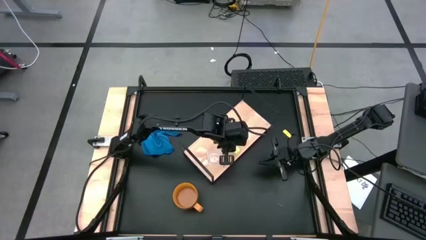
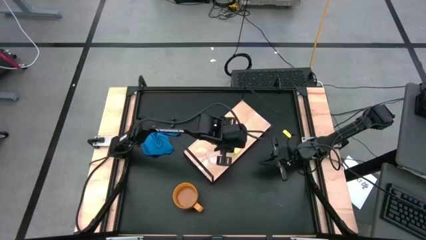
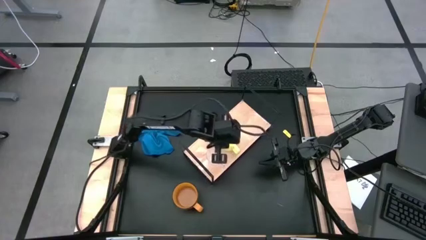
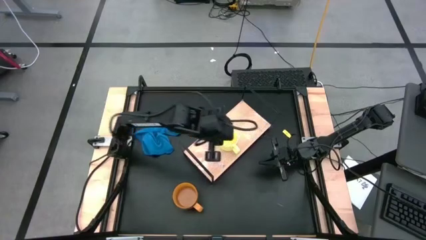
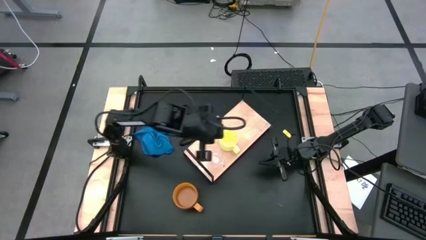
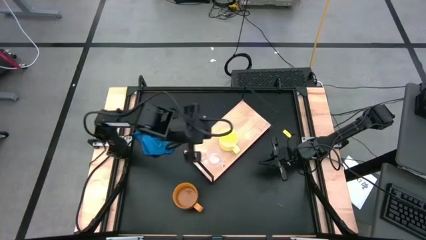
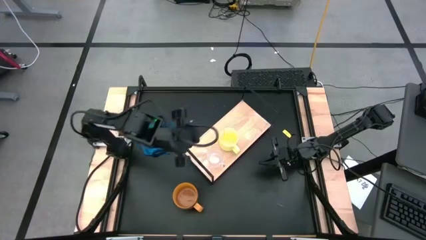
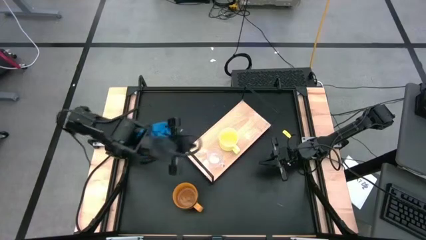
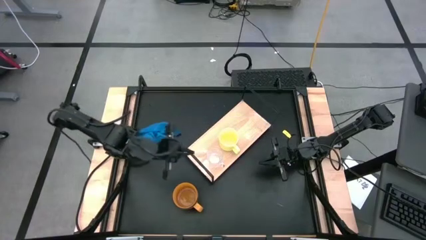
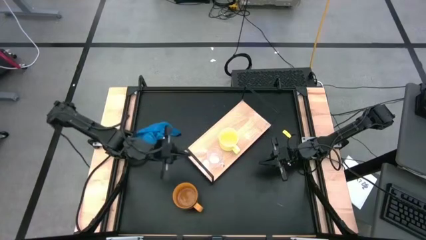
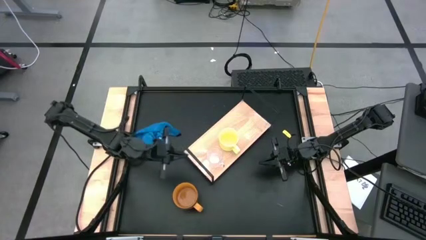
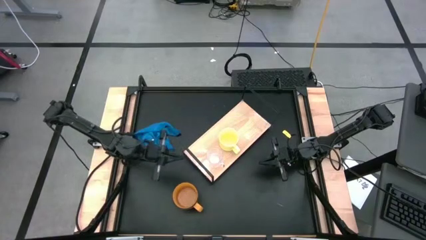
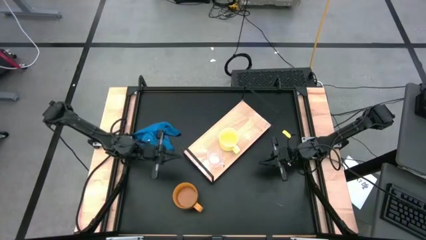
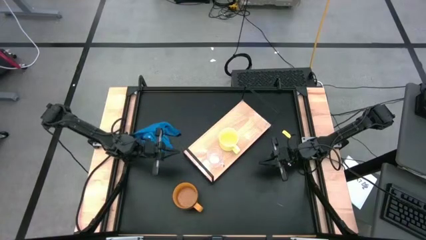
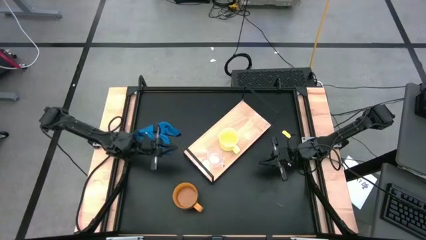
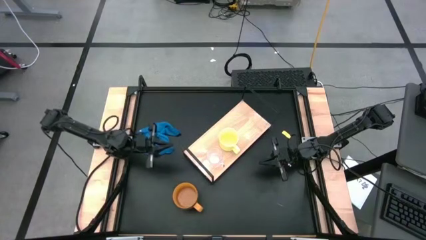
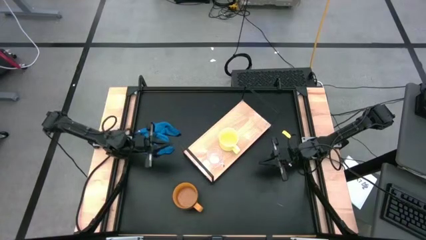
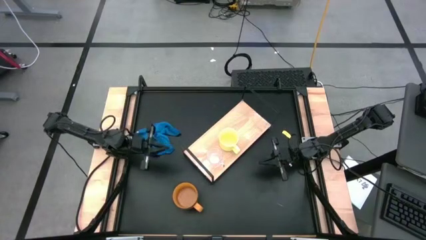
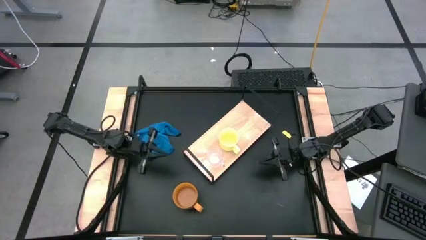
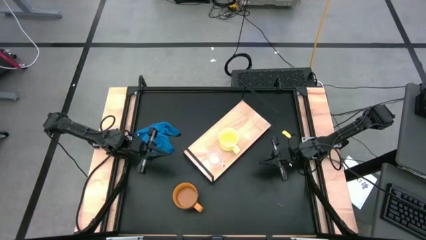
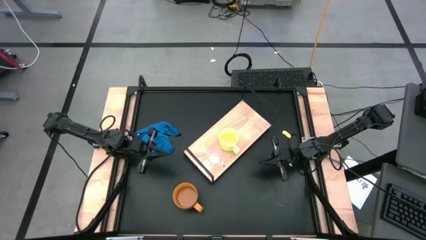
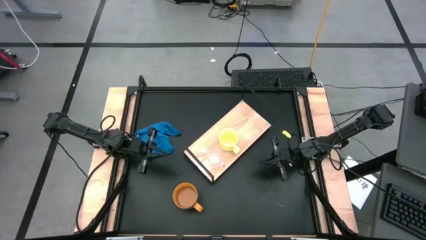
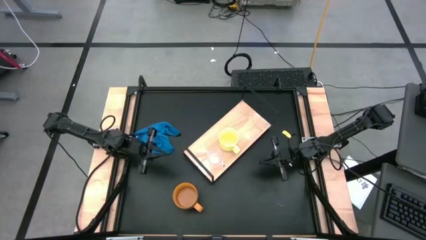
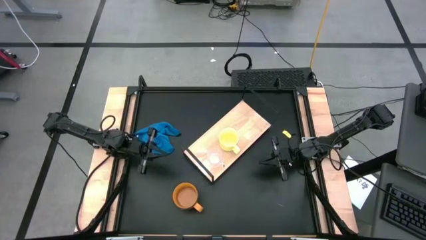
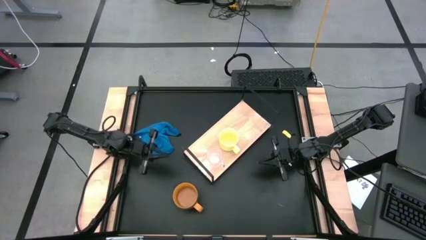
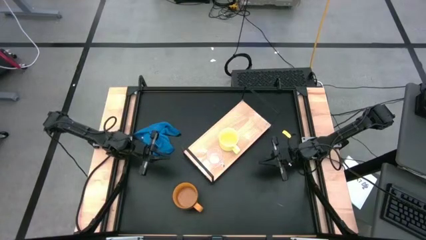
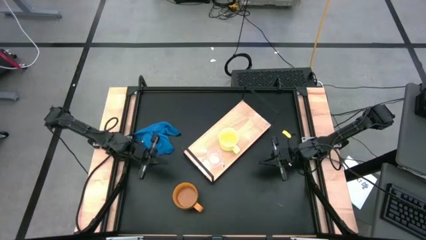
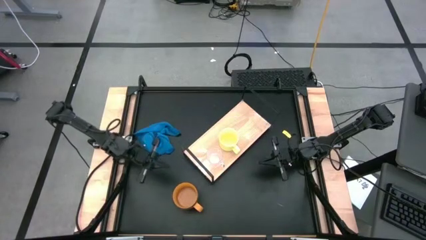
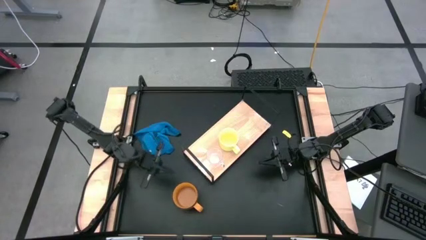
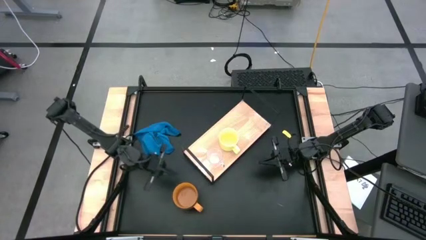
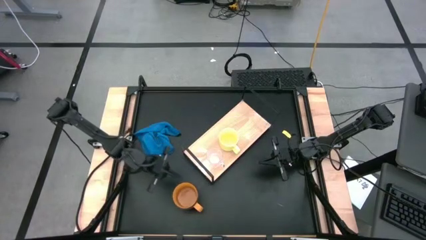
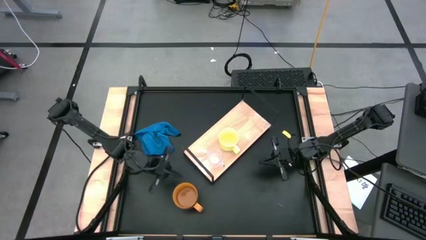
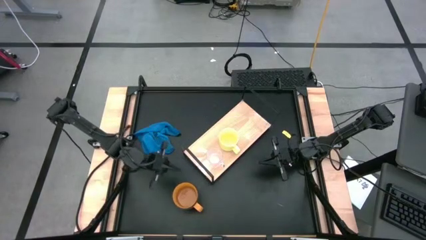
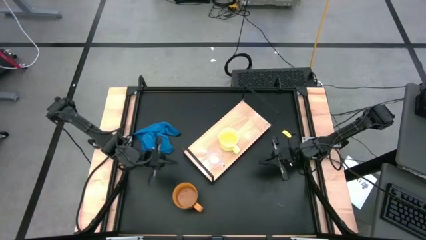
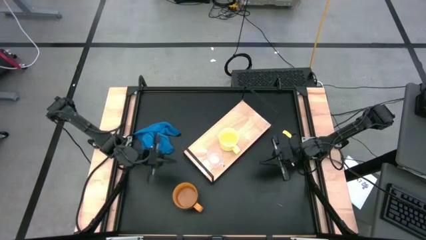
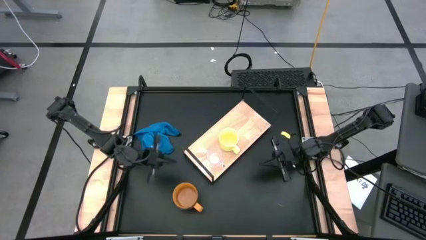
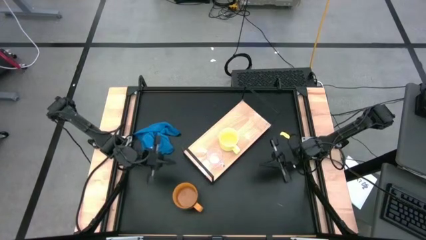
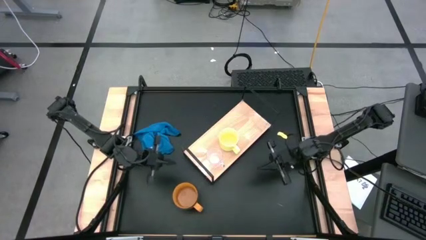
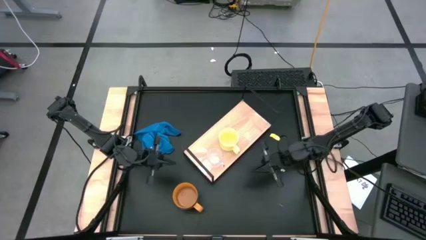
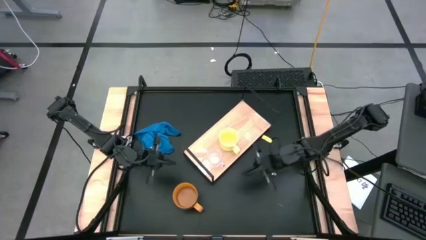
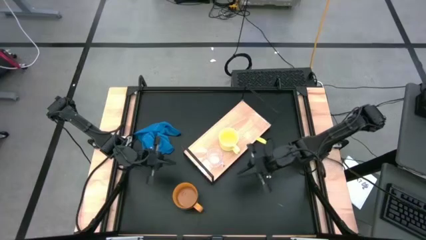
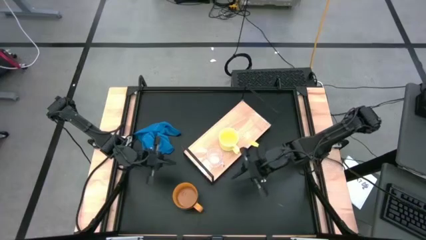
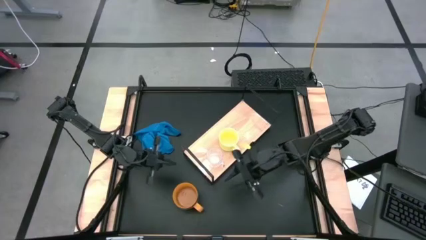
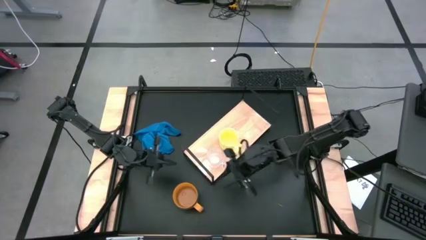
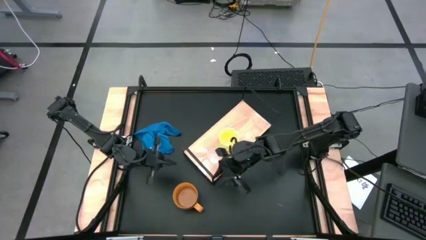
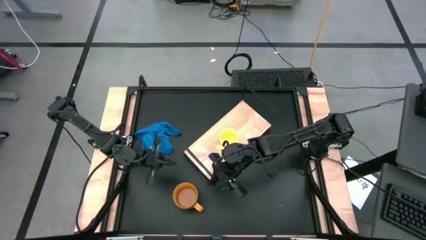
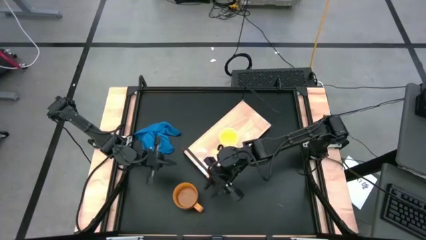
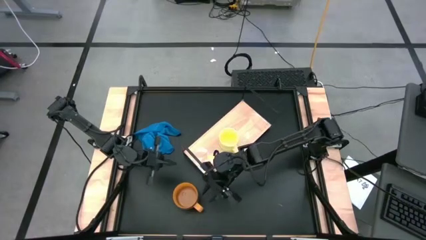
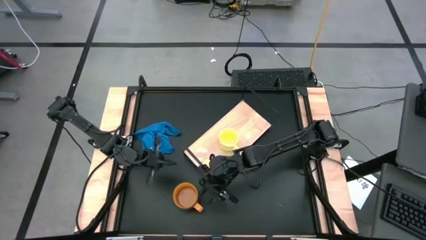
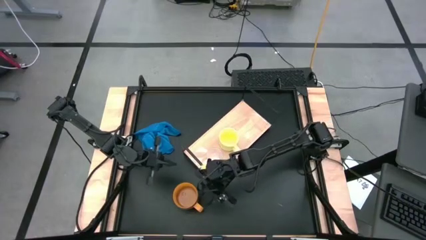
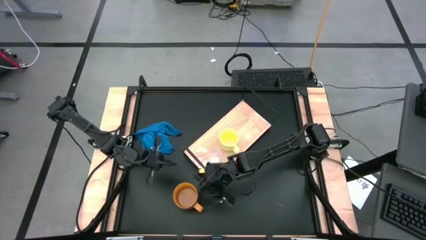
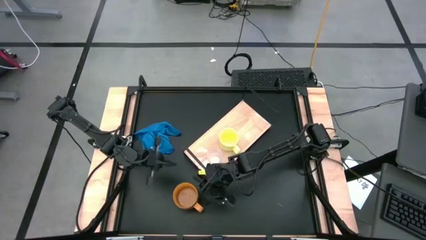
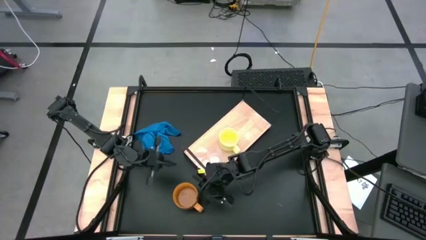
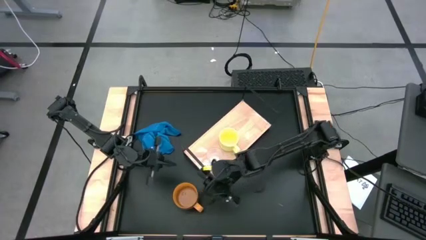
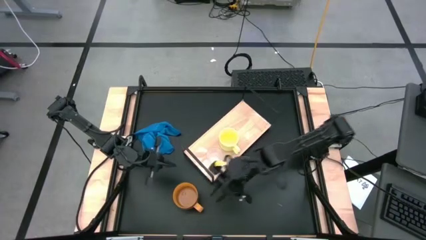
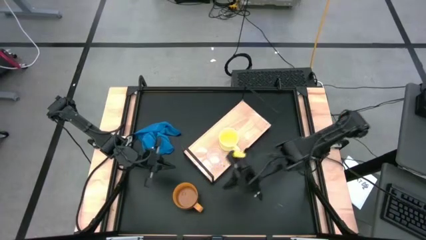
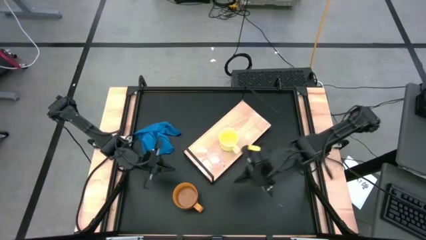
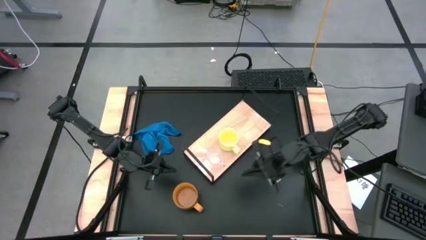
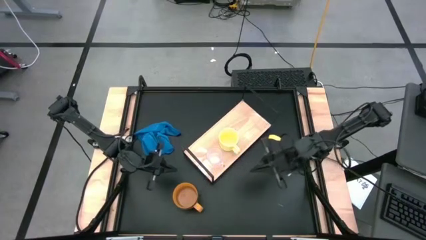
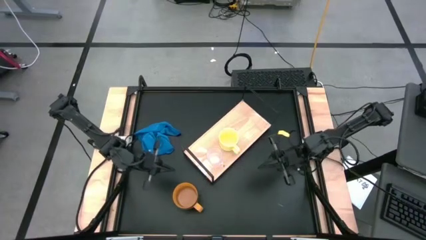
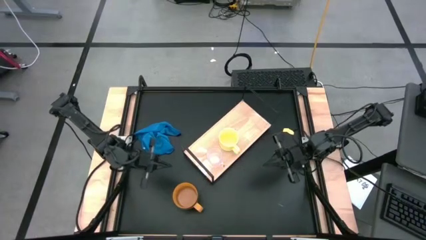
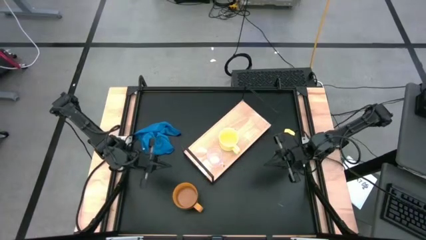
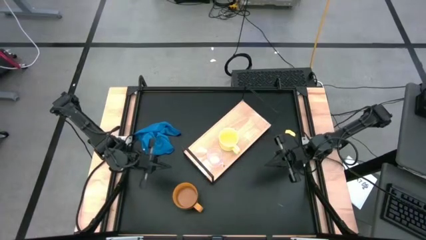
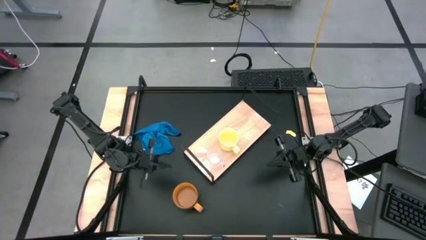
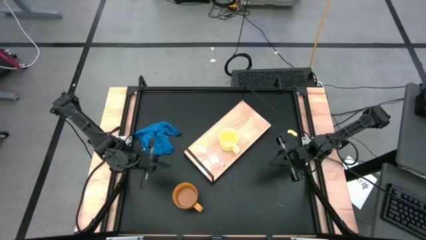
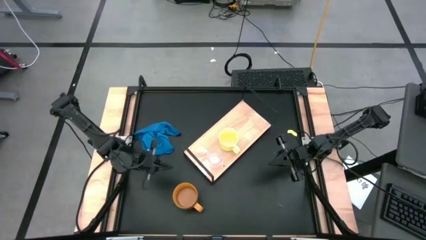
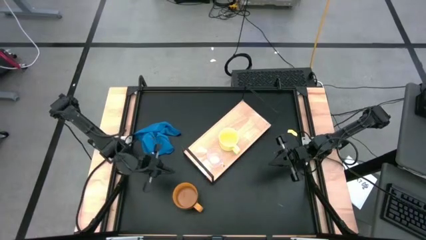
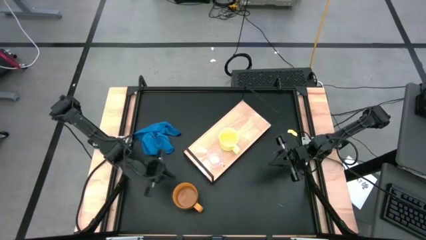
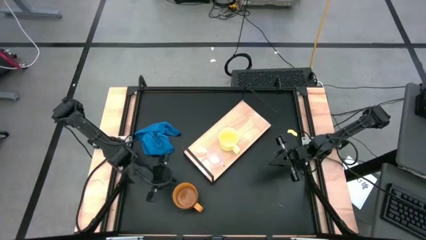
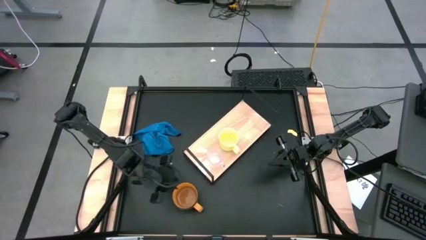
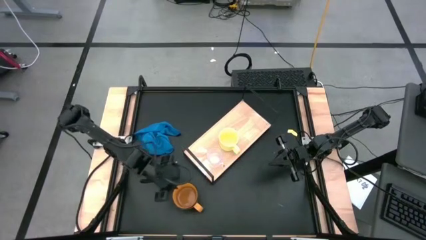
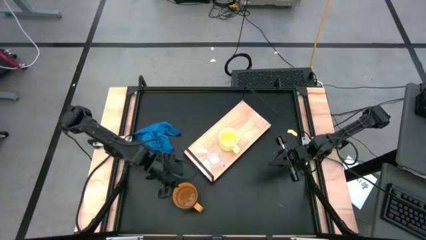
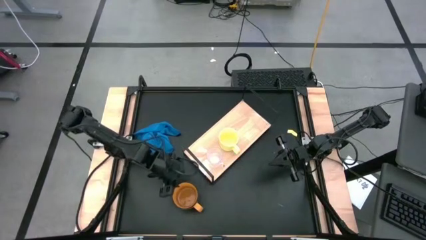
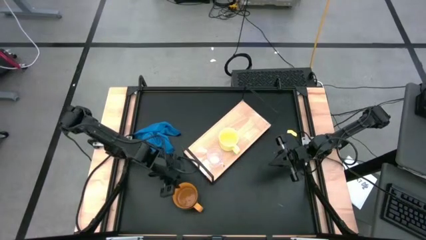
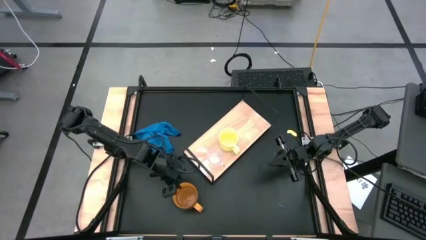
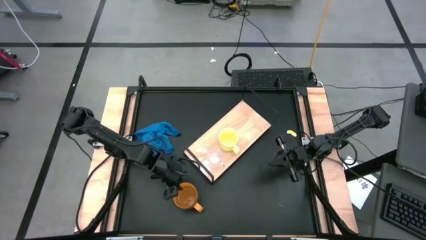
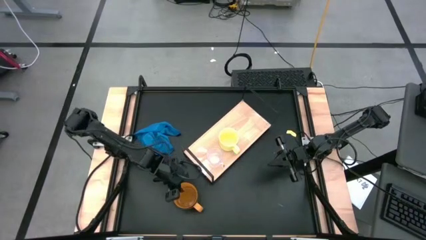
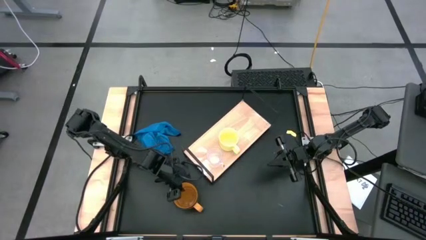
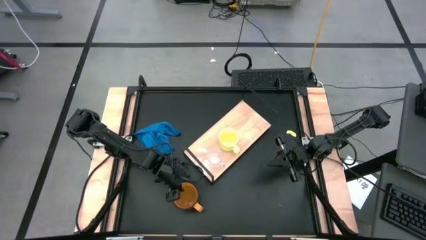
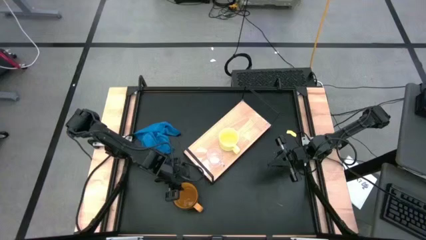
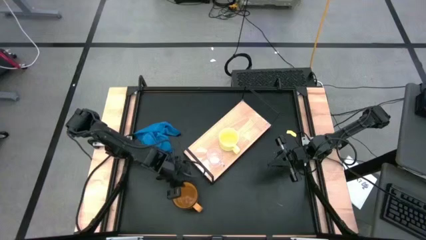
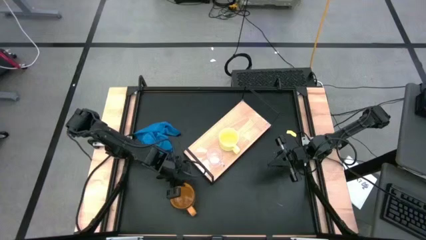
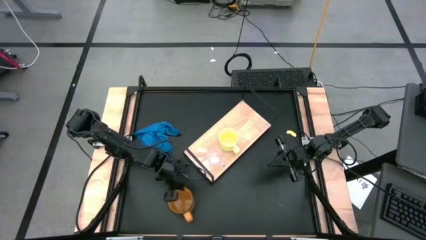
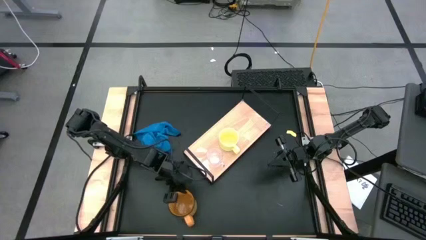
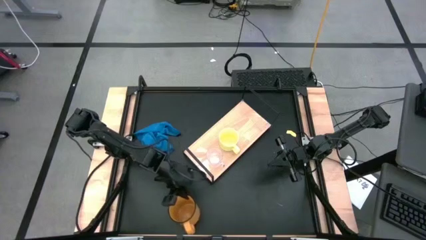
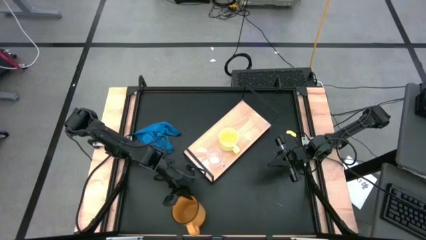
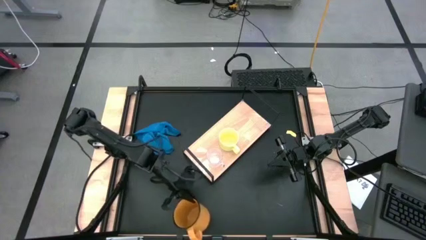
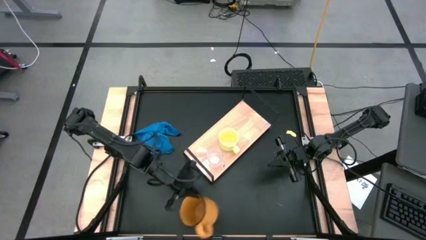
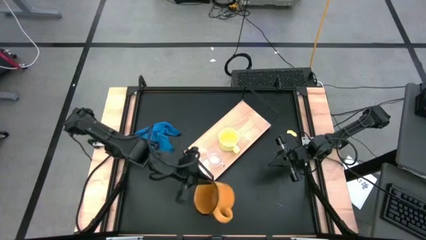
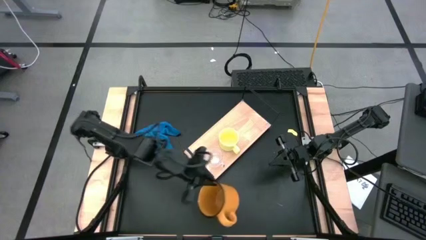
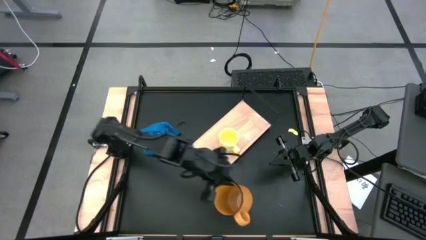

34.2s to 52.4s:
Task: Stack small to large cups/mugs on shelf
Put the orange mug on the shelf
